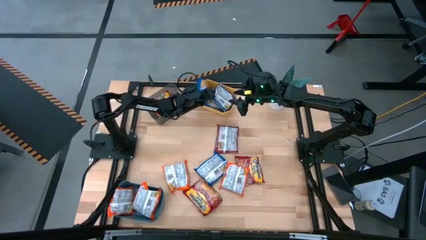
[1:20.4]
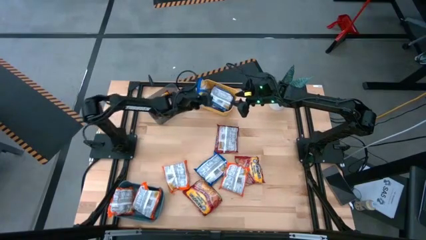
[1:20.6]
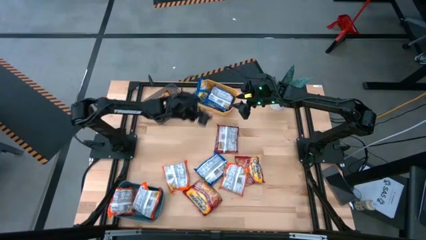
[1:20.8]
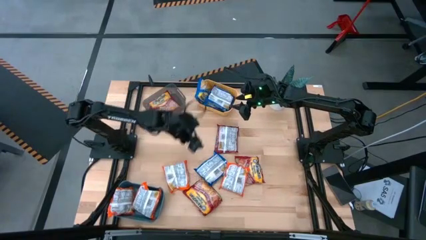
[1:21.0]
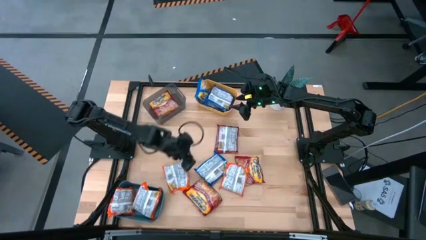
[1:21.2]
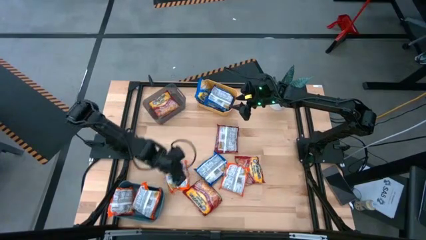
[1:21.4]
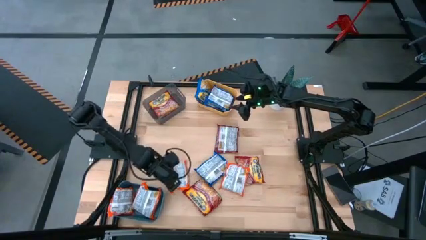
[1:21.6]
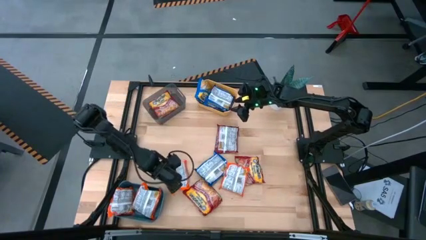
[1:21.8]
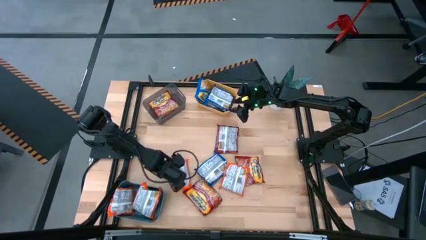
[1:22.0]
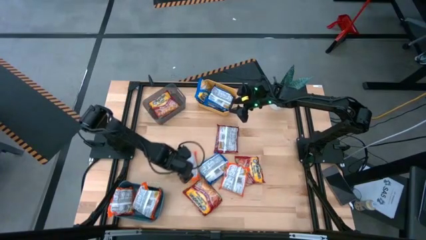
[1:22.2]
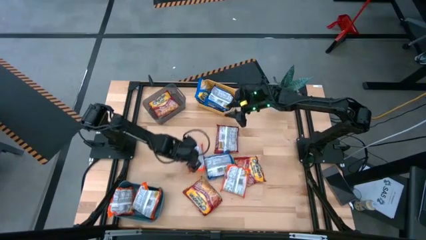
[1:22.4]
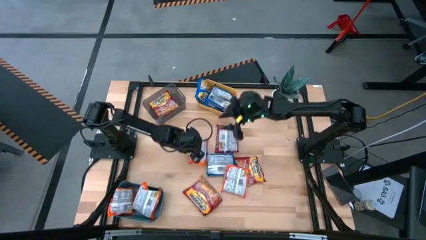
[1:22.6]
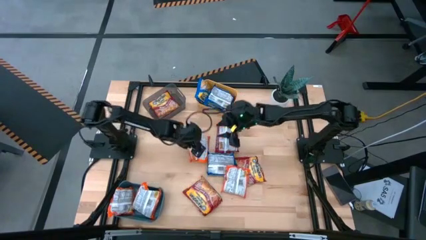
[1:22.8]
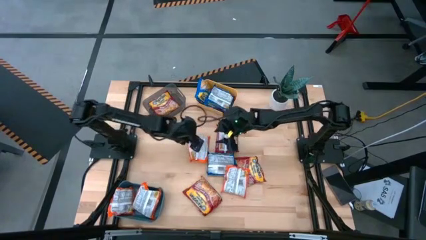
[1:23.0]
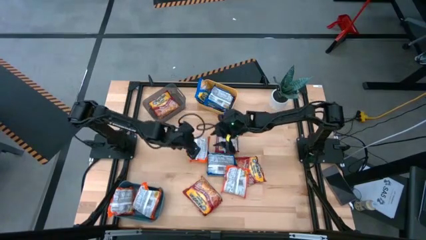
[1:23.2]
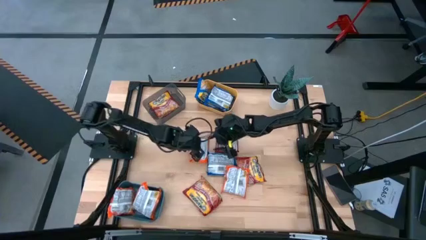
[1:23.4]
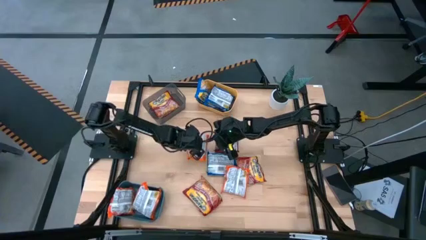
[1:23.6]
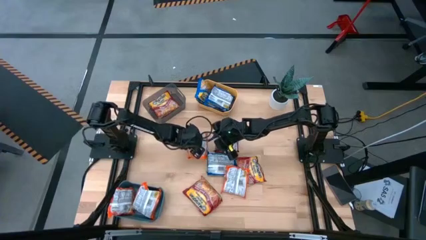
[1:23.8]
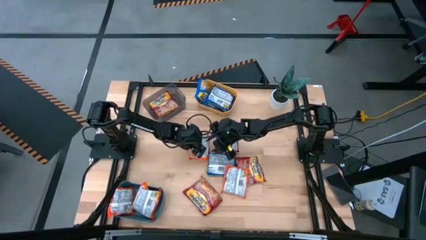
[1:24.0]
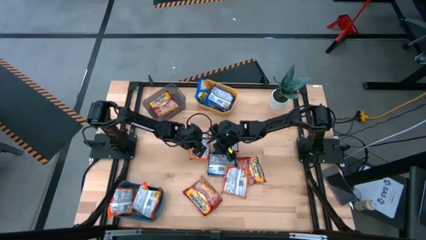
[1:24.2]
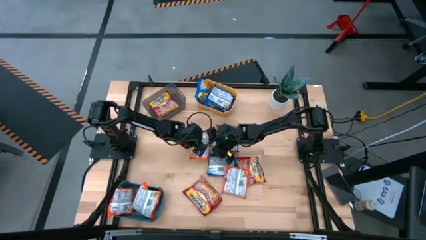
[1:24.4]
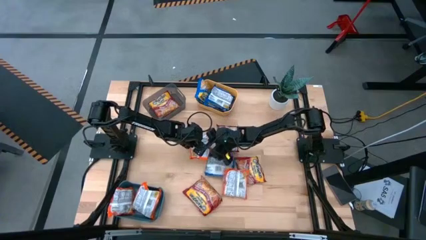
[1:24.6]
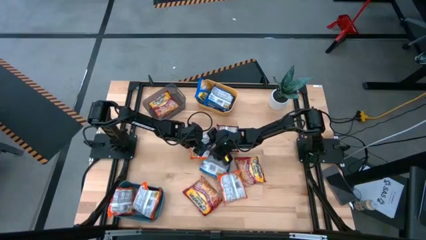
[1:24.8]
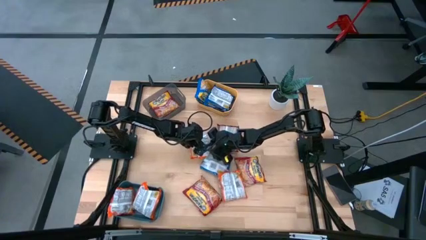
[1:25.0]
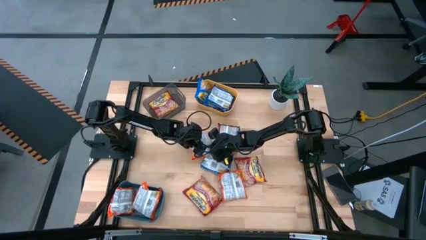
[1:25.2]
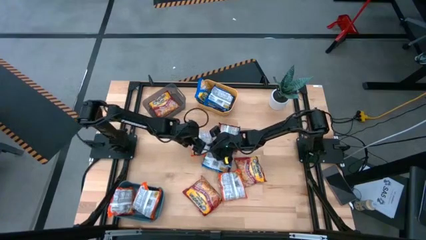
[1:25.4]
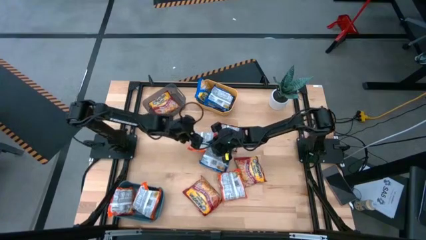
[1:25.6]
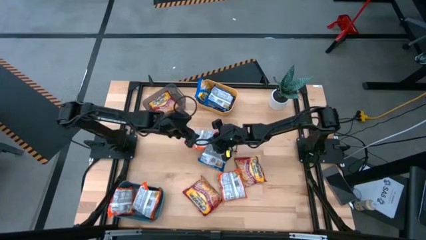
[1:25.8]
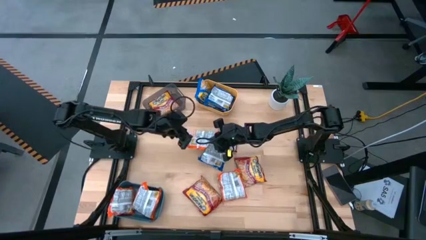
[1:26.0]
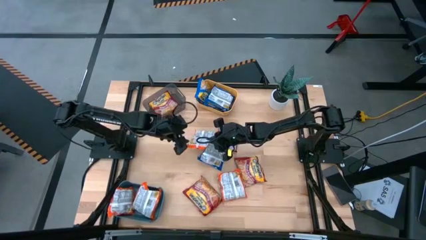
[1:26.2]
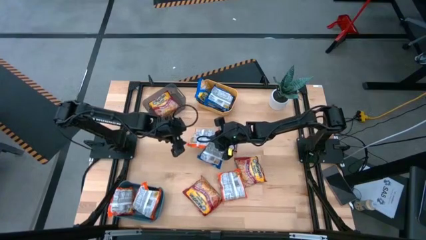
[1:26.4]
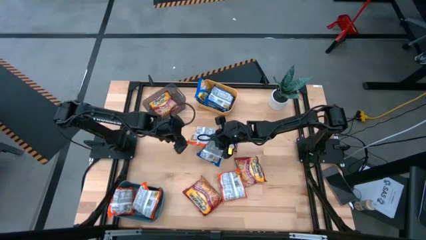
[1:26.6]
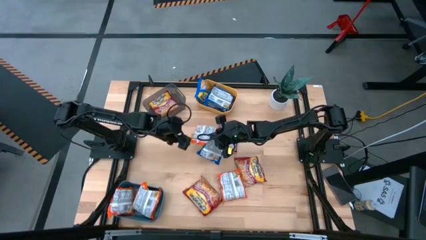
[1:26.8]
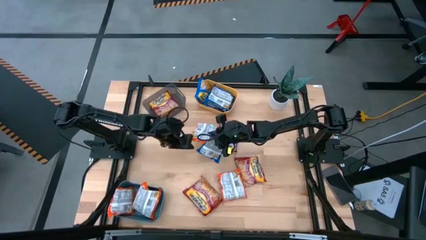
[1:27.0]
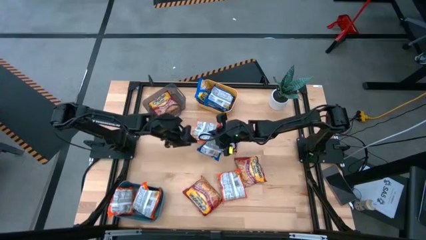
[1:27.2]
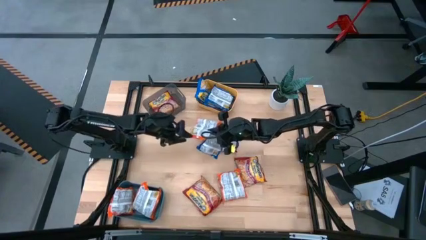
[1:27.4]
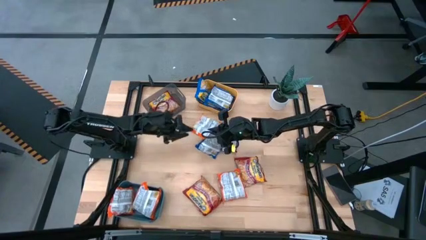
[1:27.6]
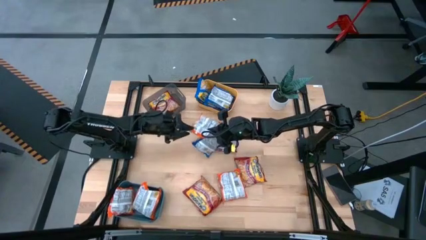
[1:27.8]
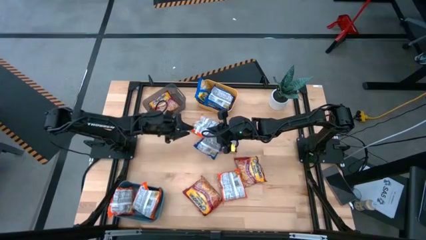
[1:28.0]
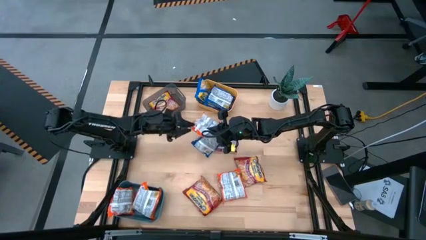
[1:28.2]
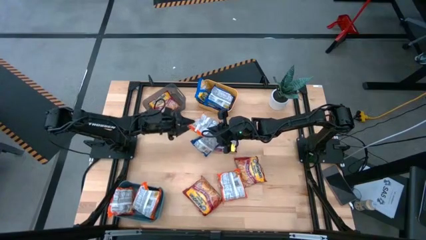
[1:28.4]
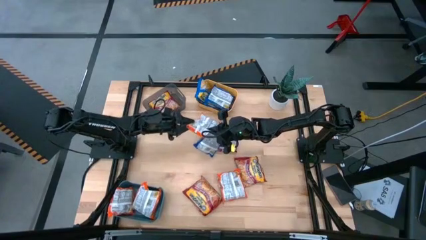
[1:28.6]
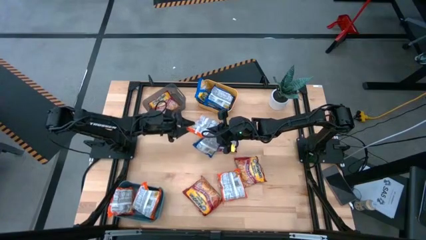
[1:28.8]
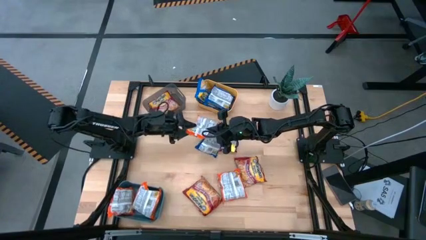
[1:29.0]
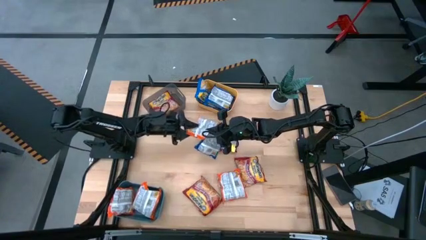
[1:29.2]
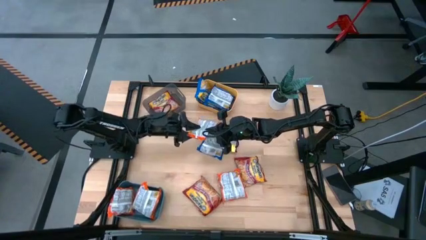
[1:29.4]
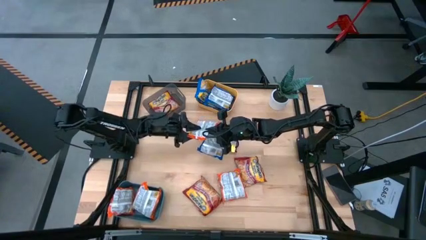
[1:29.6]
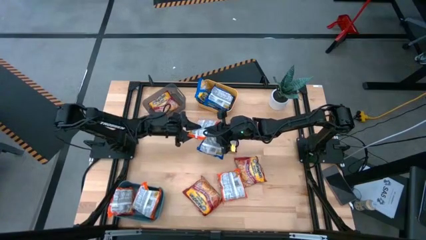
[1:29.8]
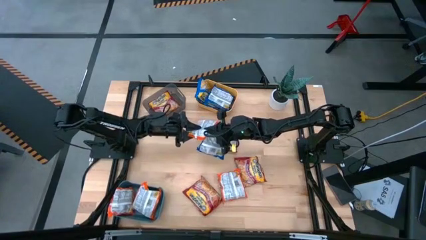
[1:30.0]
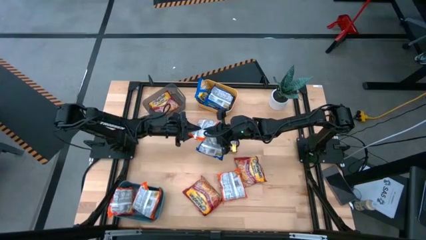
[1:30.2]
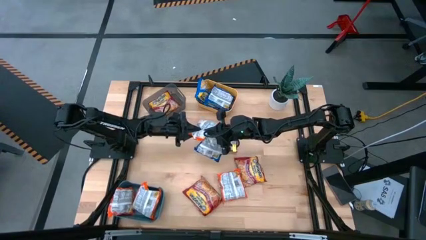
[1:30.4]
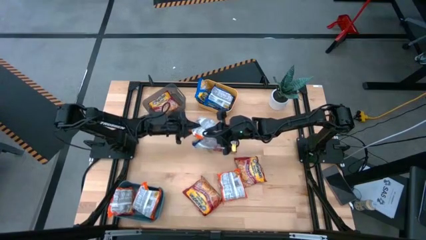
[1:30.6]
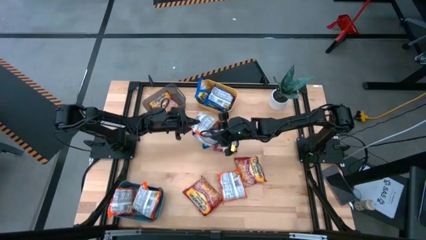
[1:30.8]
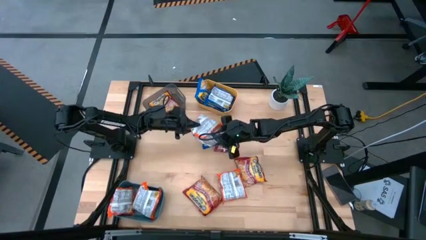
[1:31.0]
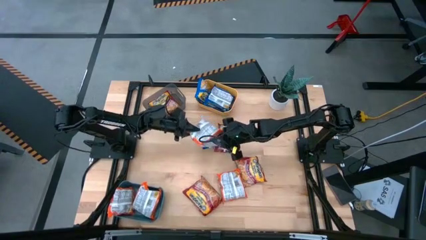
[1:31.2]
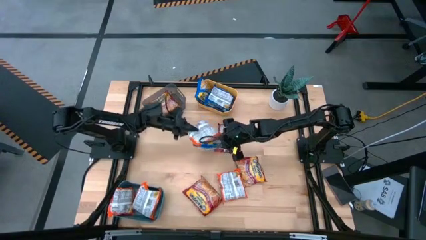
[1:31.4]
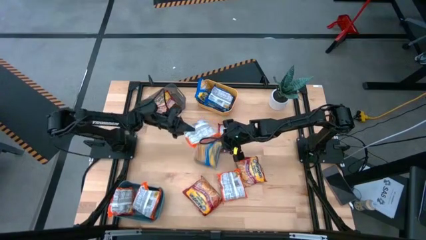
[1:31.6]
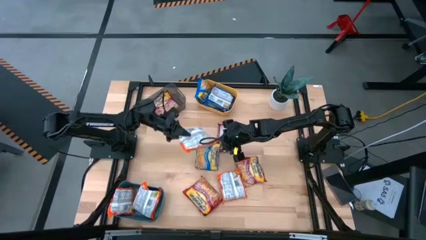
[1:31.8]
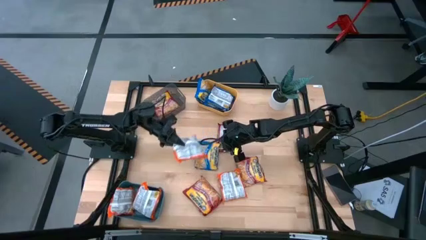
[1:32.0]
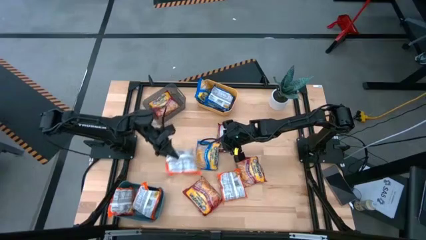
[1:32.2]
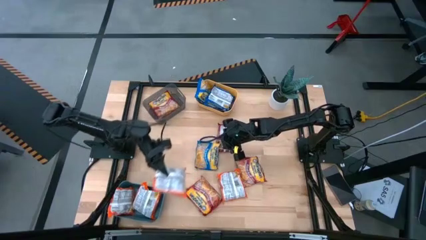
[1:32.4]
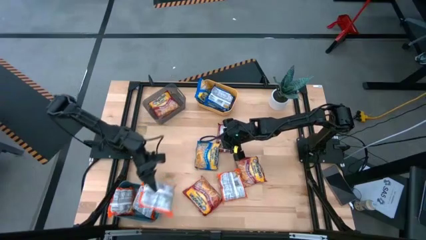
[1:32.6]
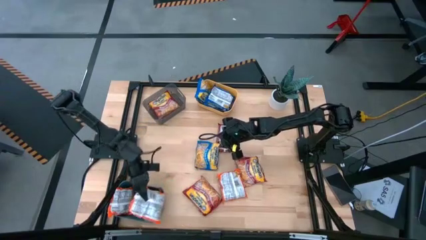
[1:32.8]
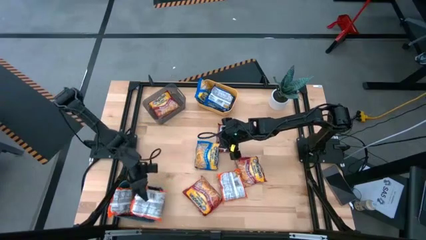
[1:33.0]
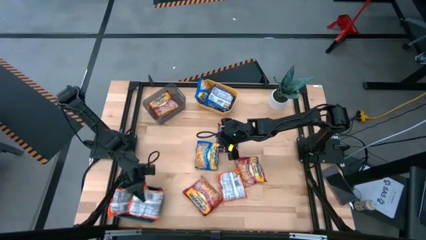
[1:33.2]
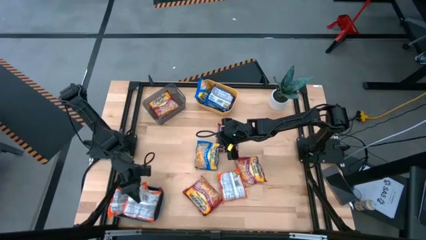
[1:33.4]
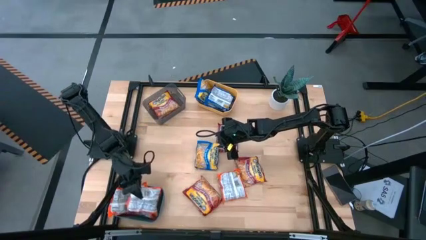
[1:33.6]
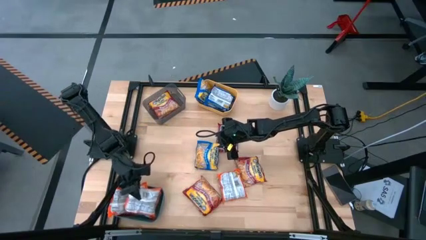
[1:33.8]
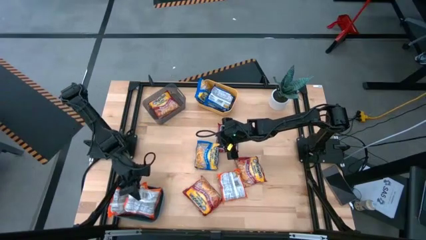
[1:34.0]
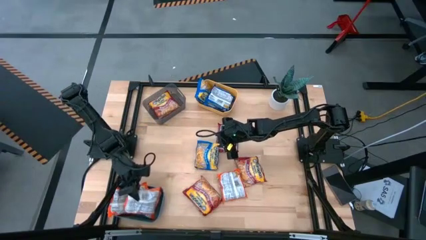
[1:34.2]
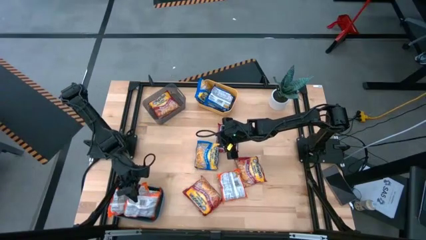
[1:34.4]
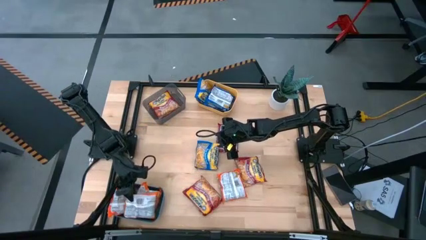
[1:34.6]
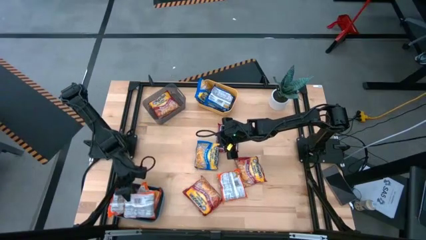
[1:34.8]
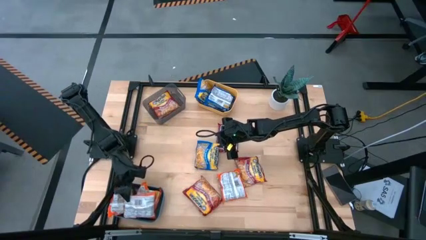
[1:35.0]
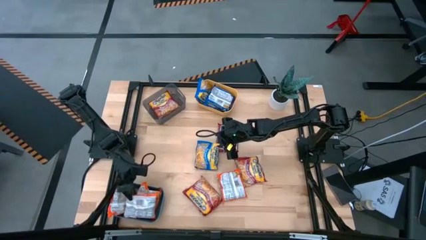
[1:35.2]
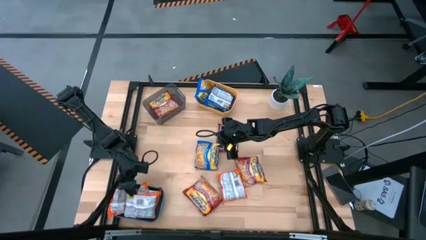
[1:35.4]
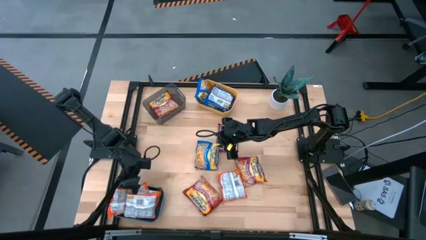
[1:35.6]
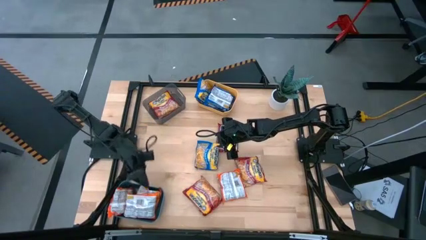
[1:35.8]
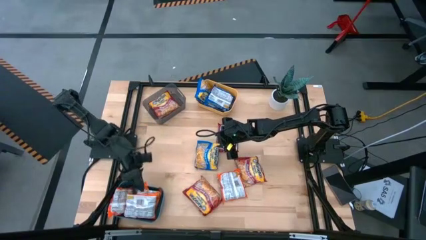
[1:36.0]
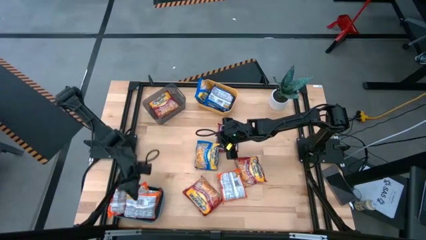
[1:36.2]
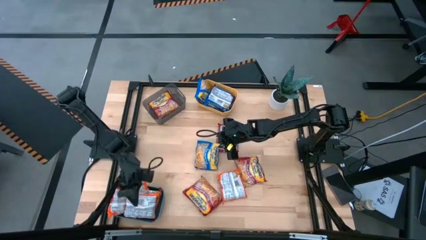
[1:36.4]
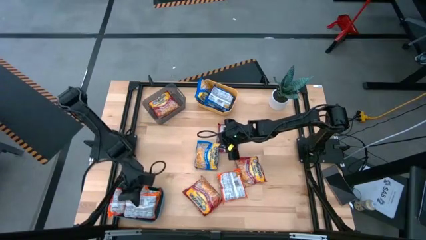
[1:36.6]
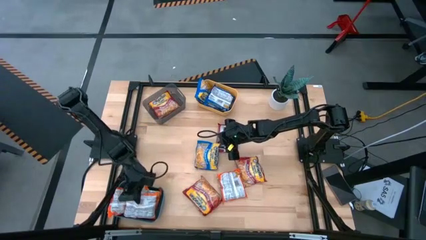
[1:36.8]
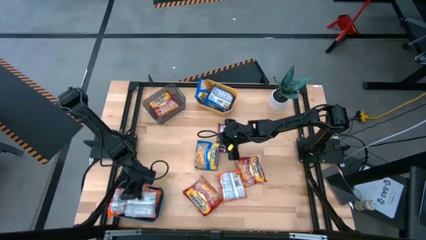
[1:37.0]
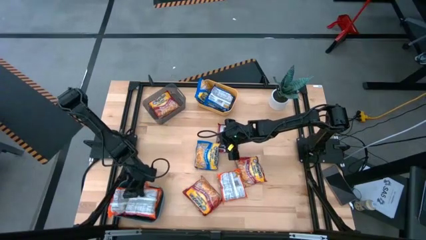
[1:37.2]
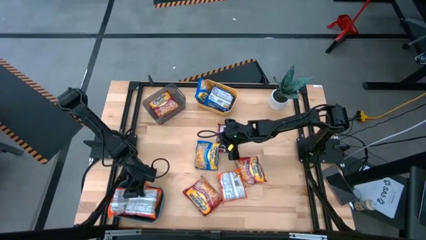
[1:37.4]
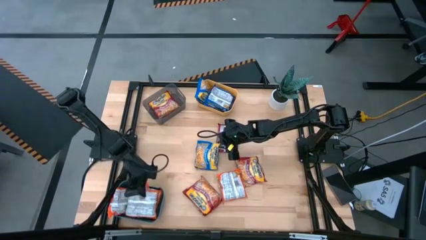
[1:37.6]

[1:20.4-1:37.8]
Task: Sort Maruchan noodles
Put the orange noodle pack into the blue bin
